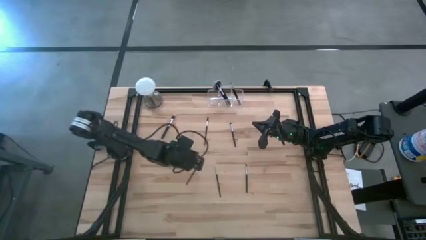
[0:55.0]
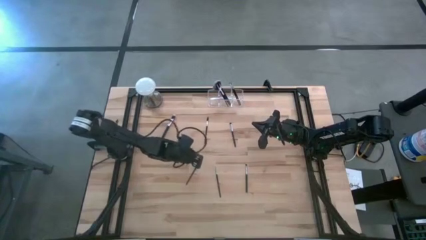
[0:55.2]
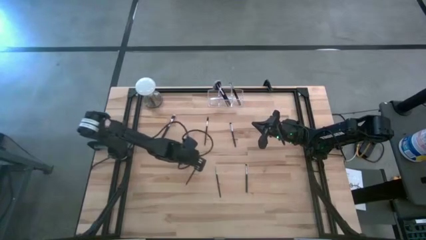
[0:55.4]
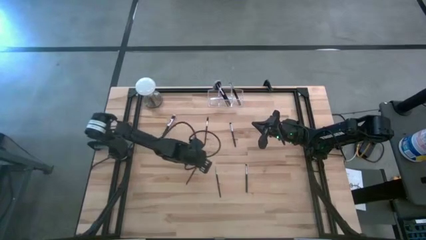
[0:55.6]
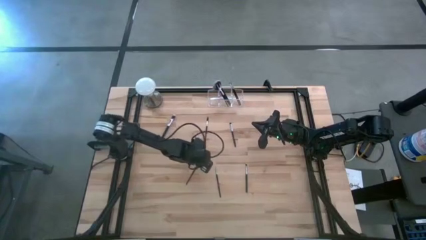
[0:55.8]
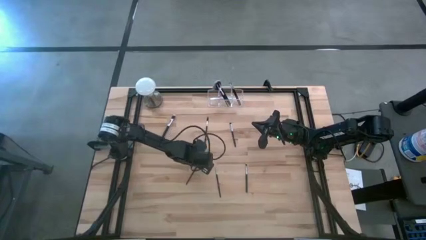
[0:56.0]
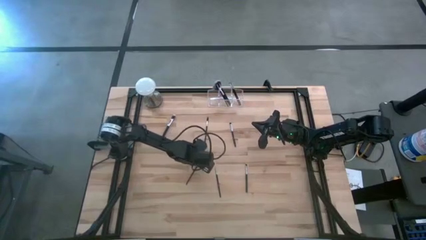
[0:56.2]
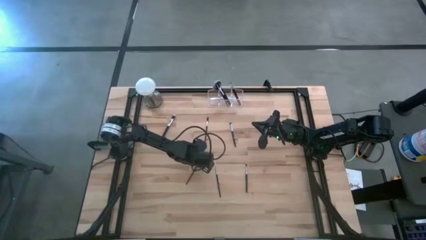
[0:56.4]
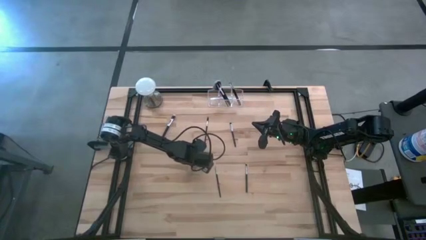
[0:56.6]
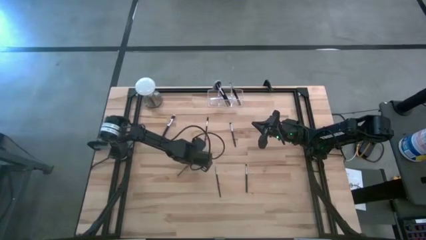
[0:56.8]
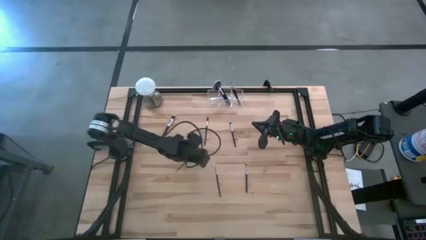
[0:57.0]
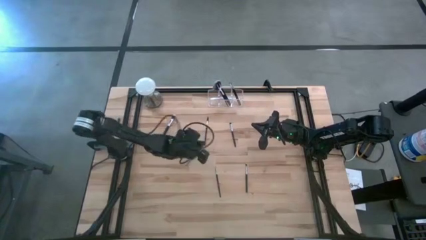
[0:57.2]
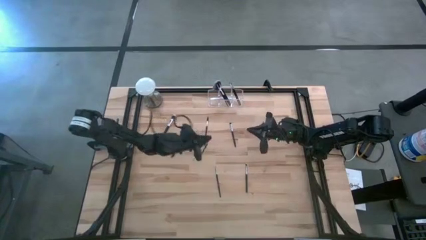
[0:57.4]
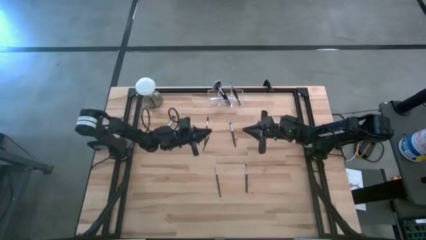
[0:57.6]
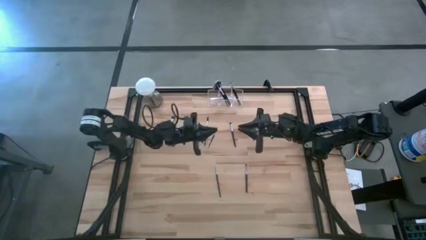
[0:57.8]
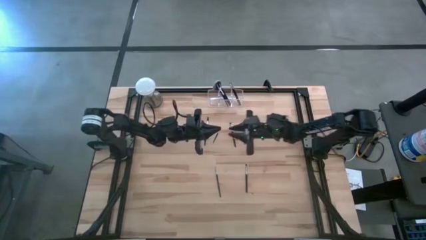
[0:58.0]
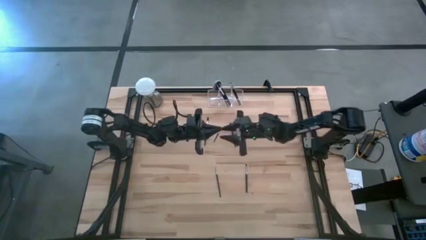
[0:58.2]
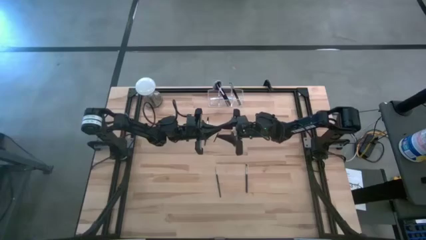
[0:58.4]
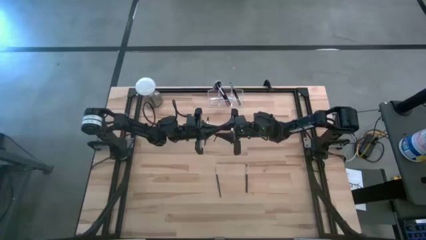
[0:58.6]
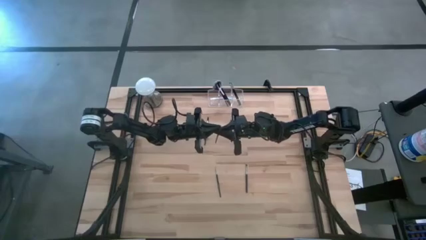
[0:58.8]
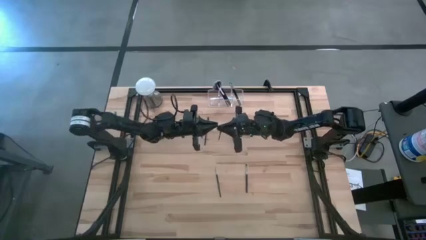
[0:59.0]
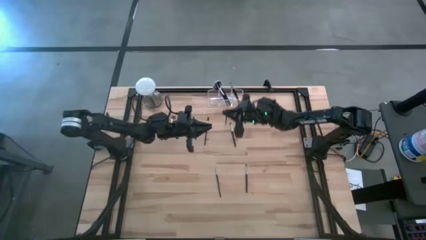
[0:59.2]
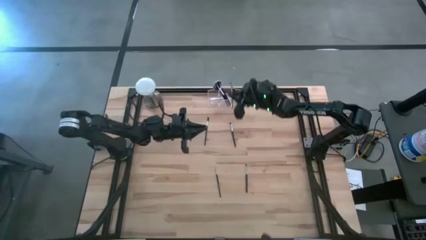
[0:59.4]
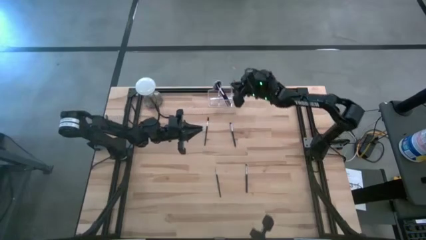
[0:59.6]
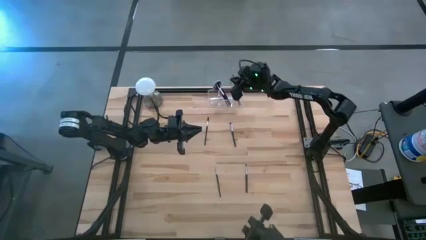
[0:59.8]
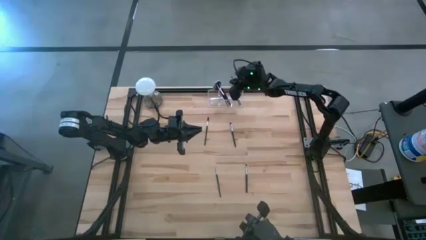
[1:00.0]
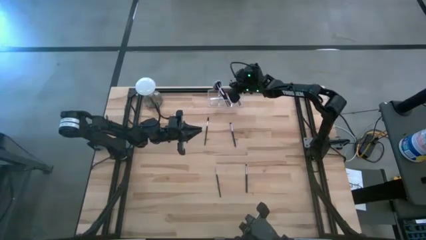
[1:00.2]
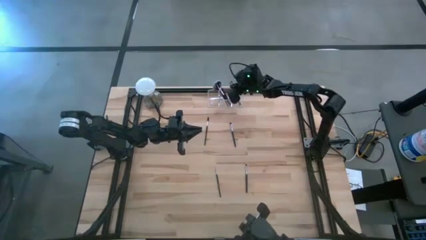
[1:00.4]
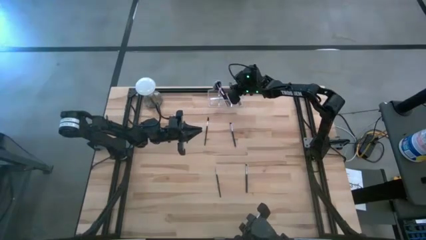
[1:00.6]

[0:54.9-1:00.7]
Task: Pick & Place Makeup Brushes
Put the black eyeshadow brush into the transparent organizer

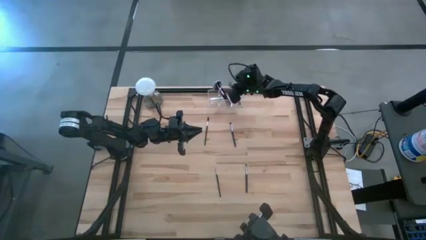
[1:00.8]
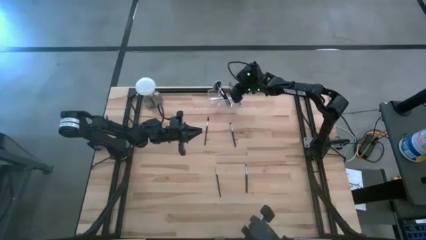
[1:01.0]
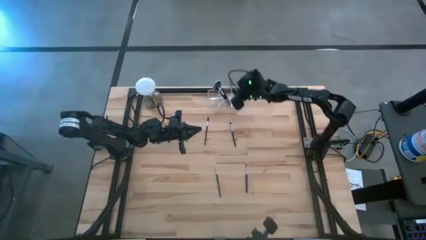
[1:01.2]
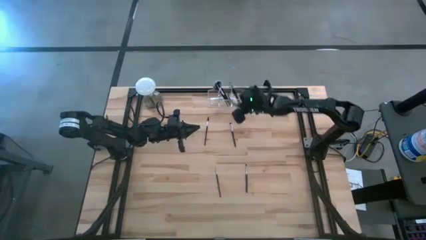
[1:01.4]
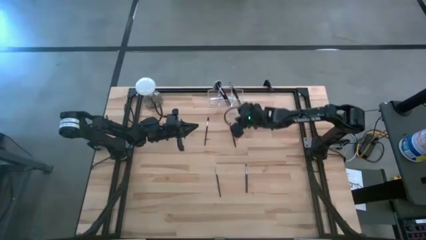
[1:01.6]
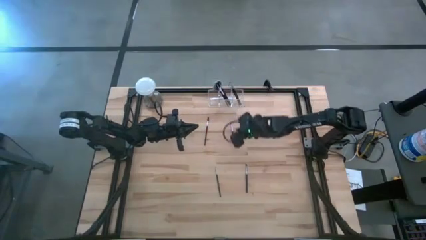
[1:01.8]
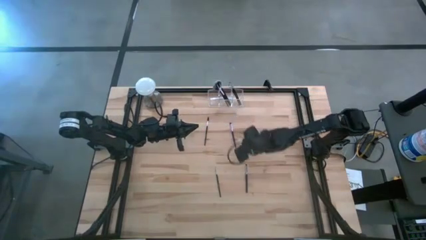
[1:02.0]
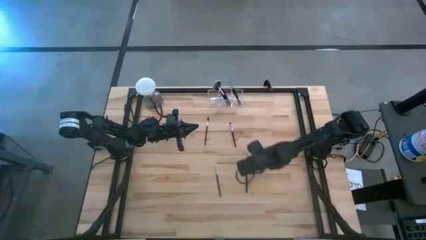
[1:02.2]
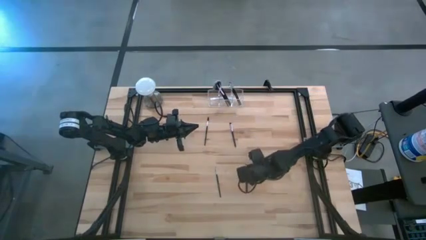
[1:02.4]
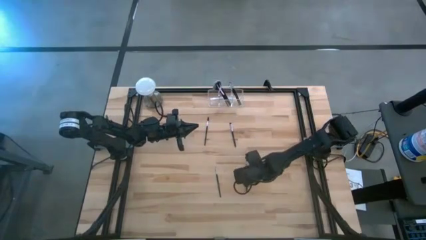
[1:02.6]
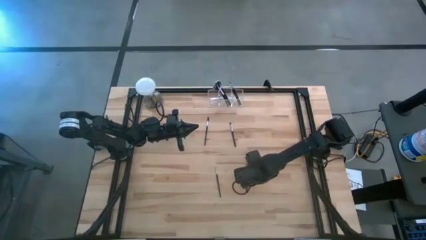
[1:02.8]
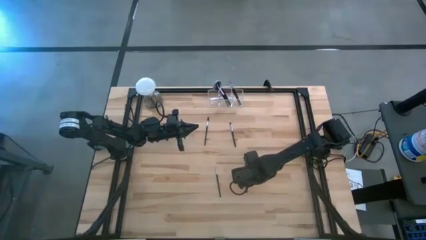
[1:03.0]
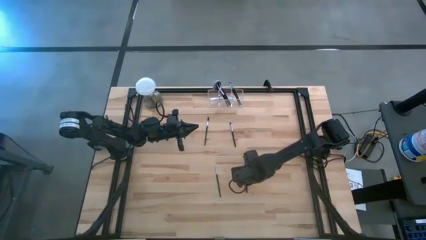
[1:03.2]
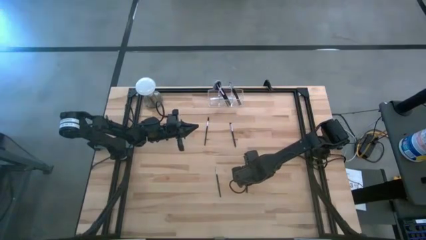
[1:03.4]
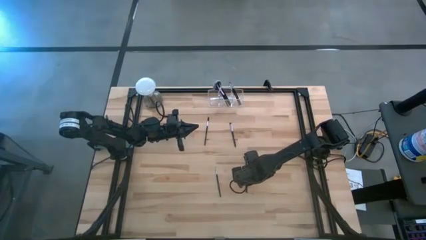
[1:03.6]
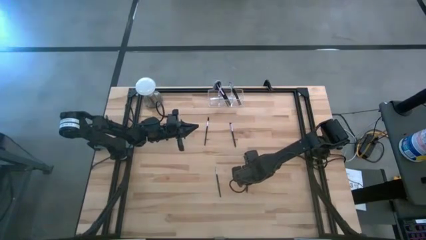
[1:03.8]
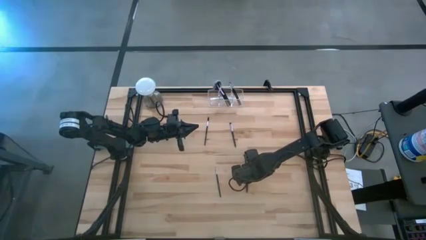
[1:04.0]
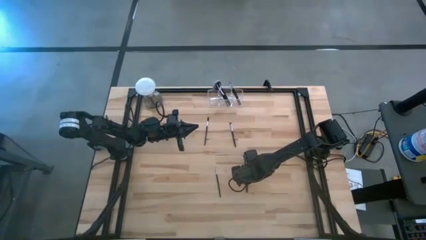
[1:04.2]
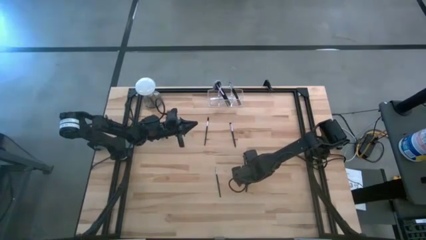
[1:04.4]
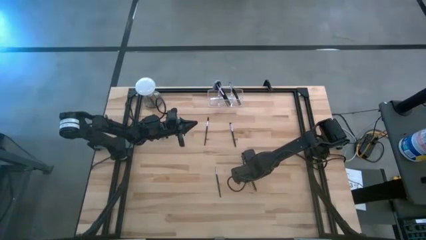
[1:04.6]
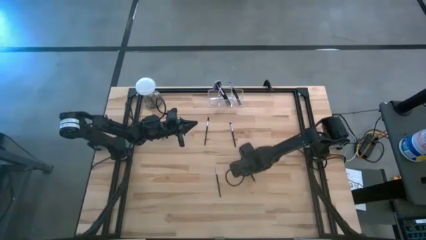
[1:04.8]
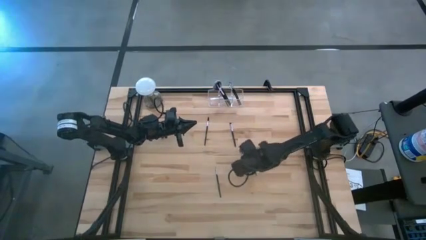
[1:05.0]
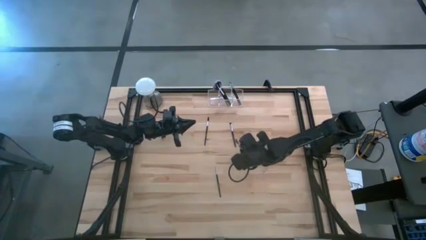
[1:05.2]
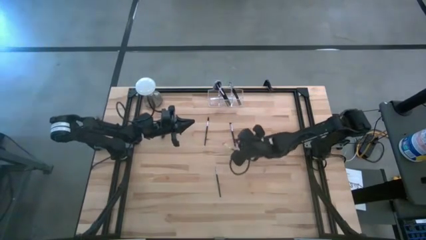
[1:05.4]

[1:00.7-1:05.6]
Put the black eyeshadow brush into the transparent organizer

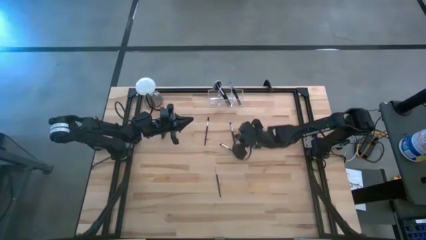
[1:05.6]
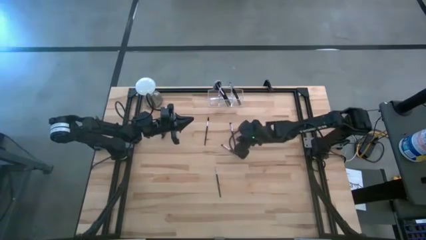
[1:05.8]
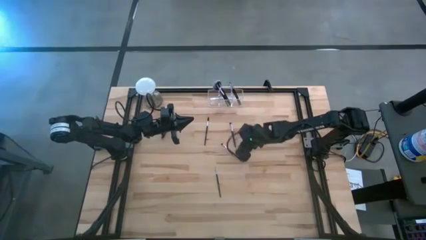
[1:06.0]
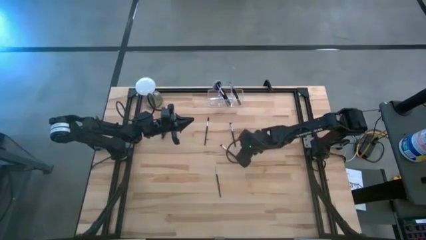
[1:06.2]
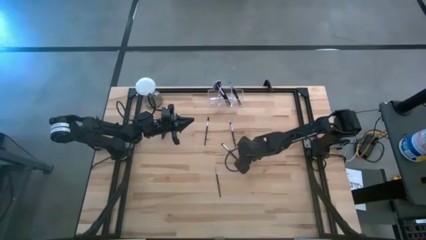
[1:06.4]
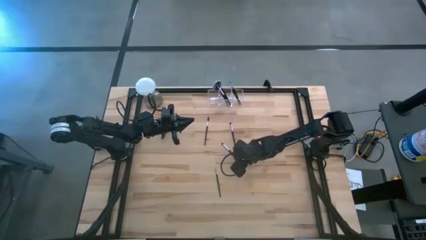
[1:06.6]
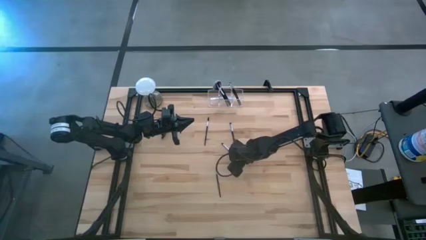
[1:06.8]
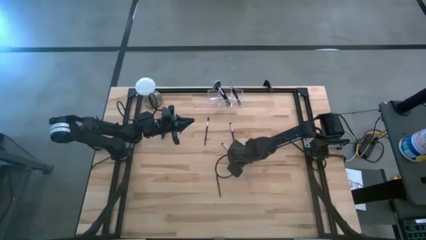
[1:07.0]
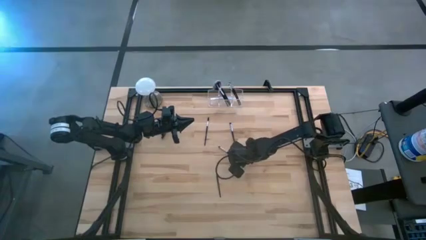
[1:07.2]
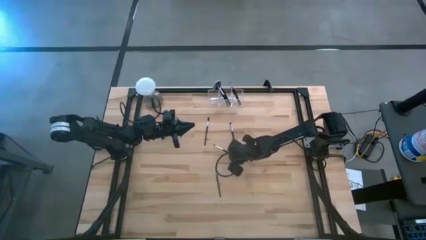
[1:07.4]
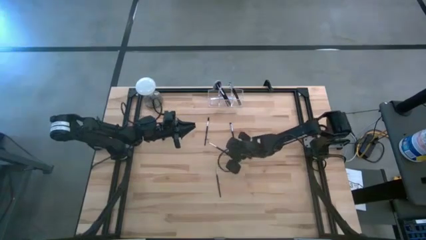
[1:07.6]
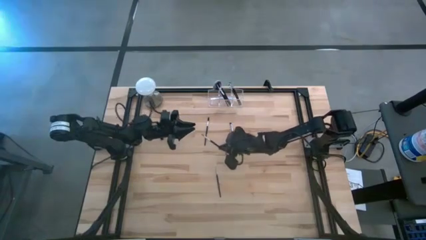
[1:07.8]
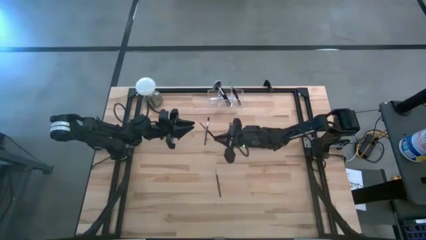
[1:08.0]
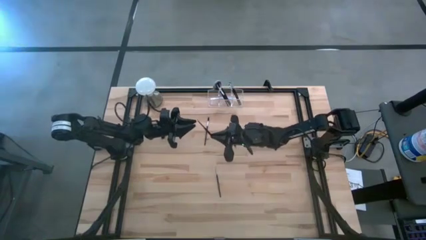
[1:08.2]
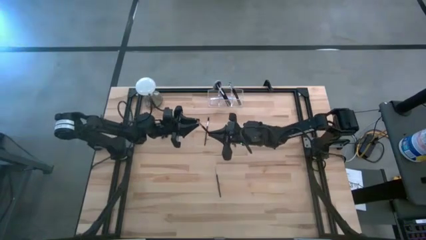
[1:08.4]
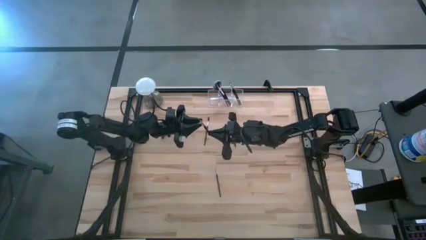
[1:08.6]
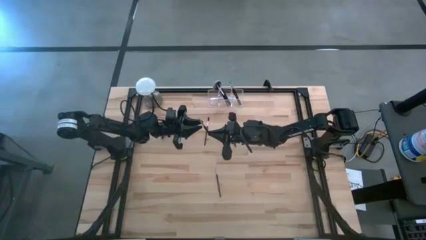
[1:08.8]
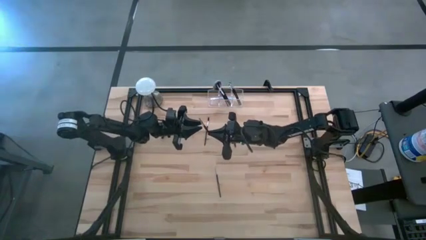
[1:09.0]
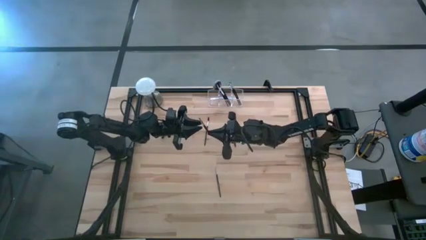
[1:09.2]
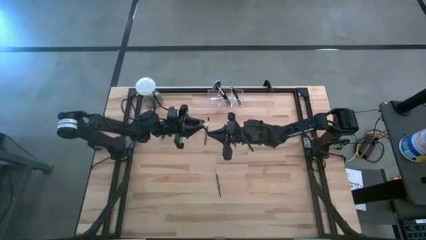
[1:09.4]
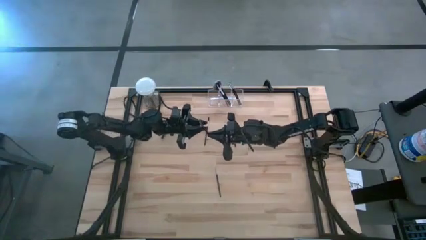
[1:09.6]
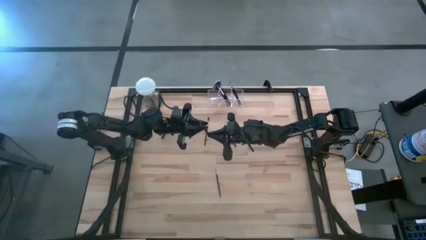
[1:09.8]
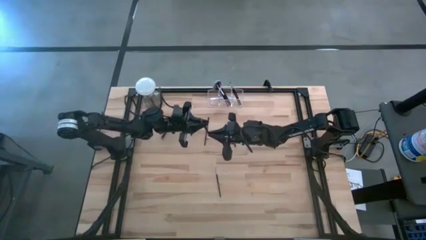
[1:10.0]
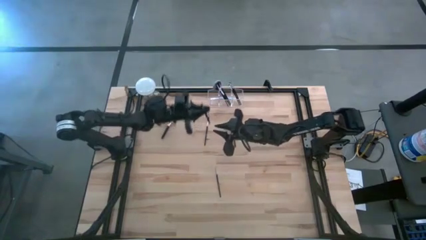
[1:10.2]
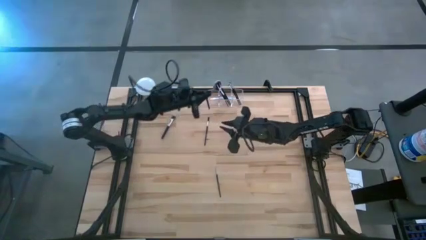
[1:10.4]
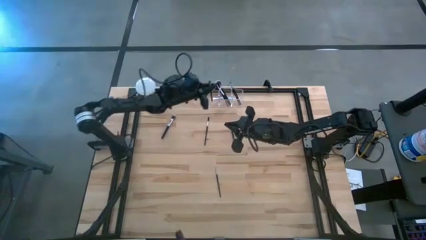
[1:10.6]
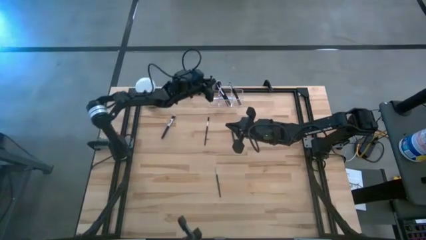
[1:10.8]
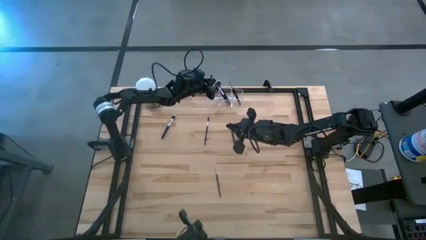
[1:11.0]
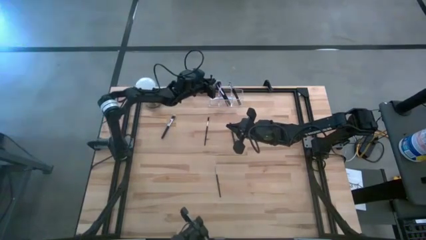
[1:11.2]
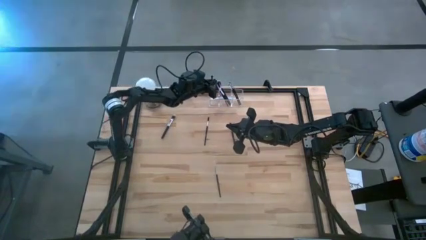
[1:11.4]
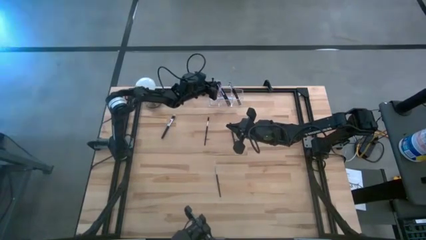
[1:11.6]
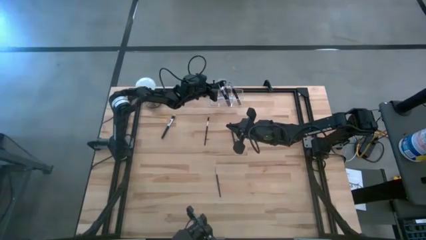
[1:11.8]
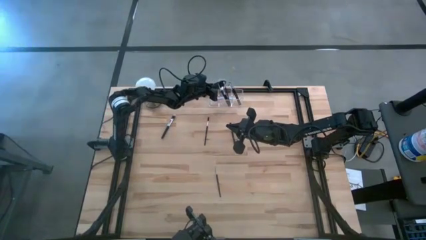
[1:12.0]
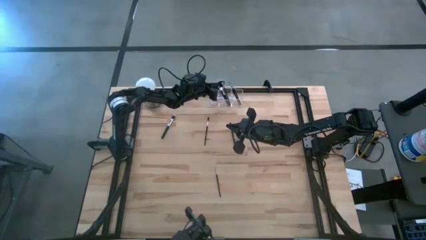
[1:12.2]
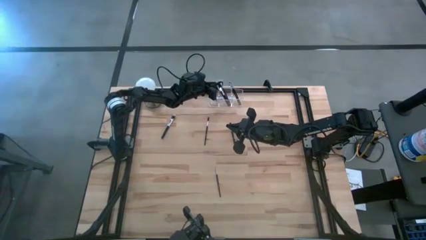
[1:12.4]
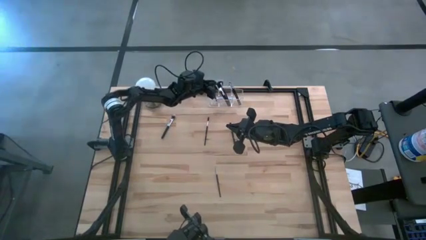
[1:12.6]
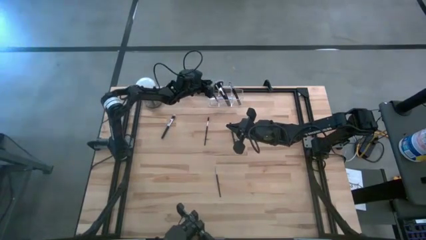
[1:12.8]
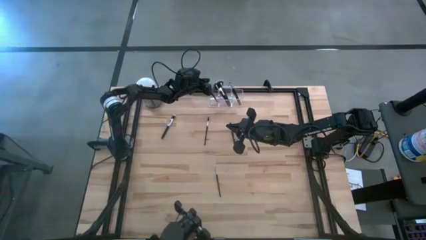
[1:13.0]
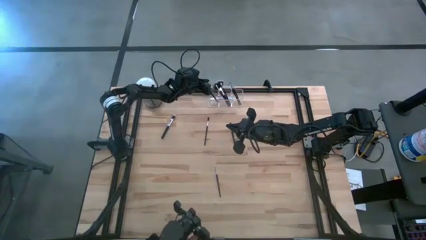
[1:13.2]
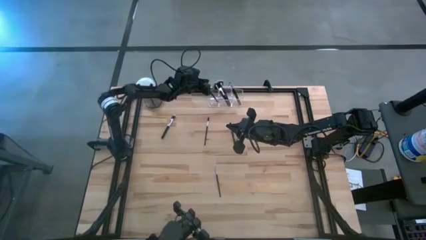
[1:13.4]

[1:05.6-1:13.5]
Put the black eyeshadow brush into the transparent organizer
